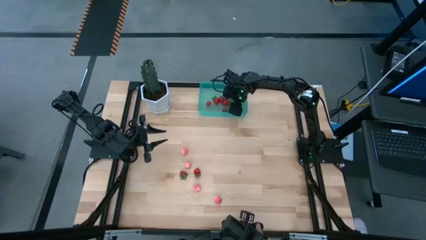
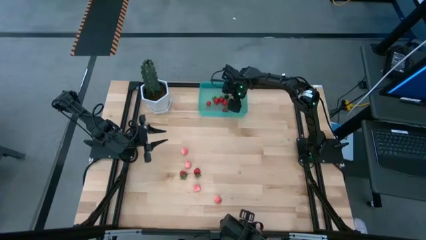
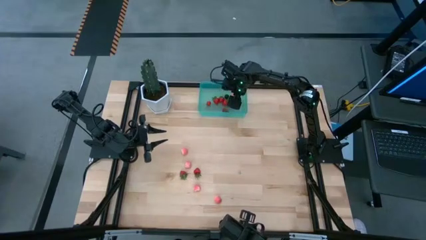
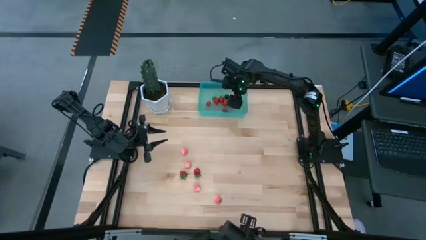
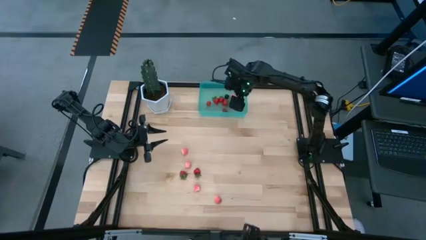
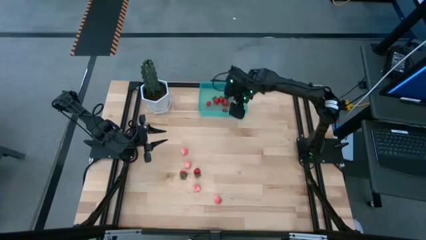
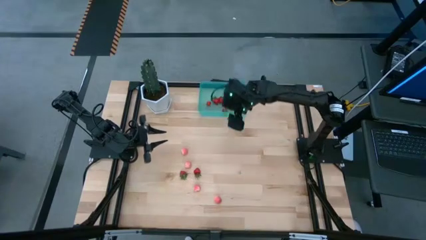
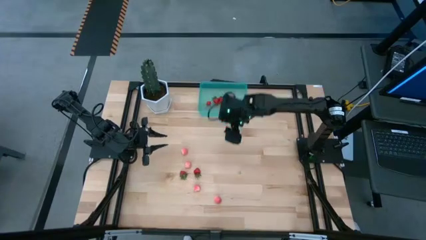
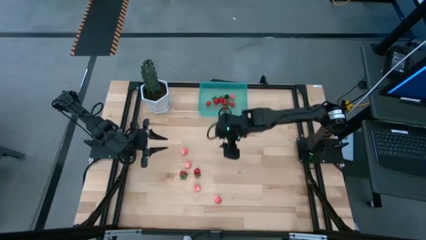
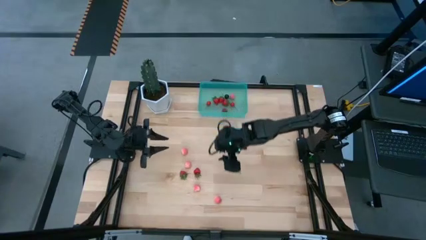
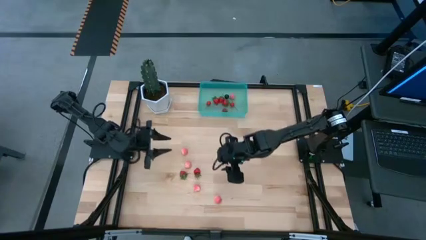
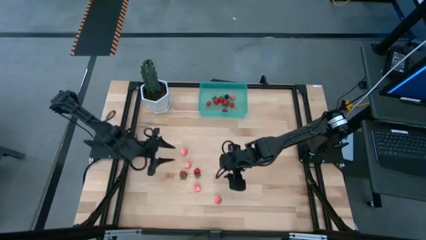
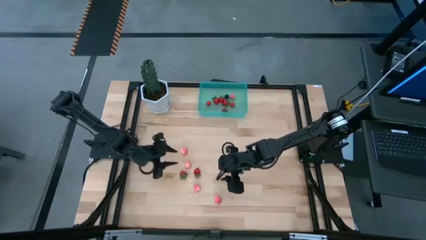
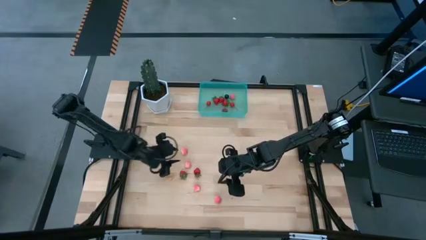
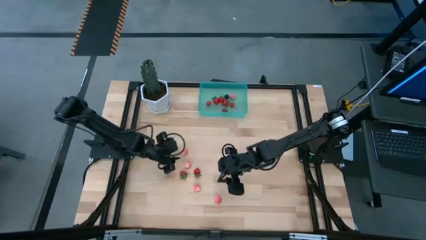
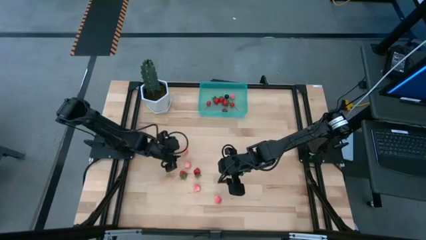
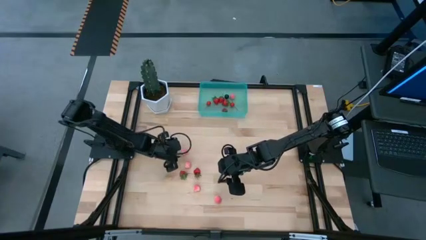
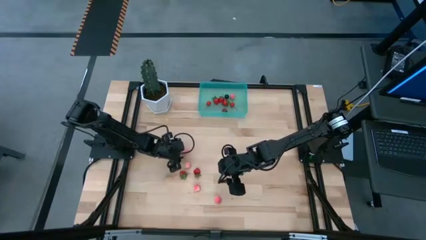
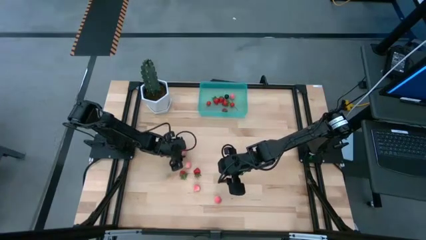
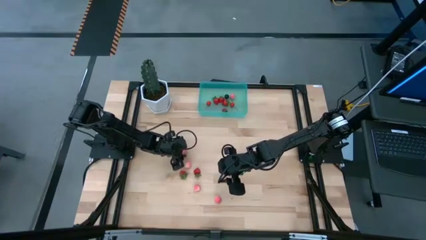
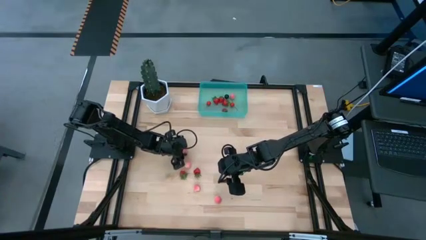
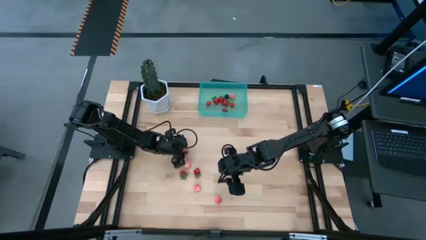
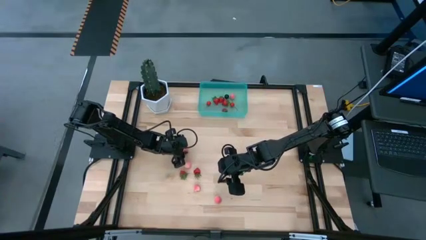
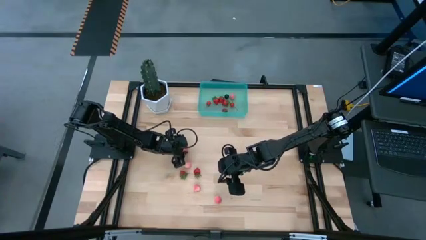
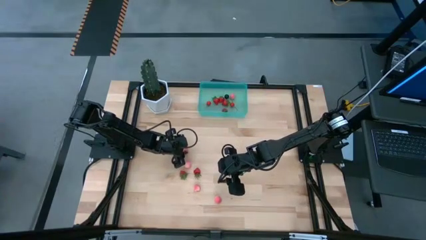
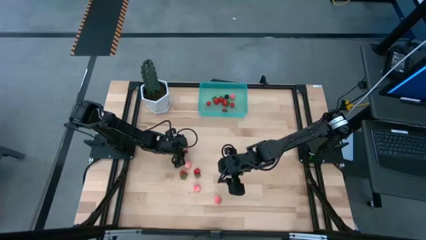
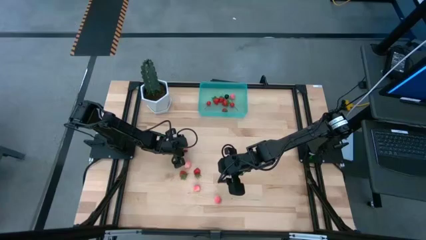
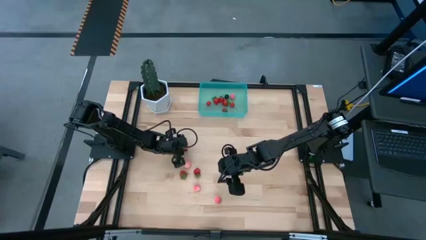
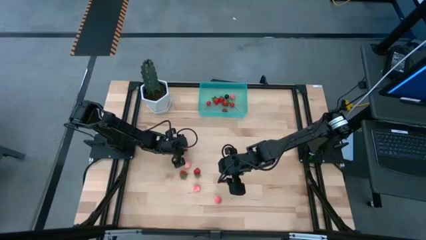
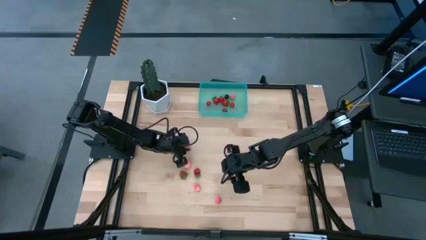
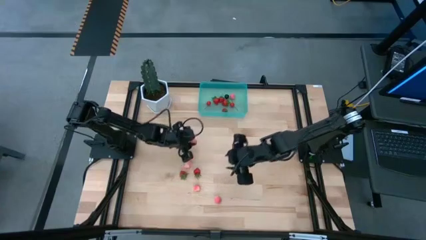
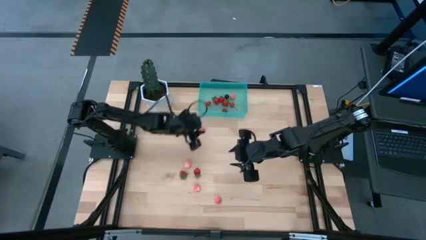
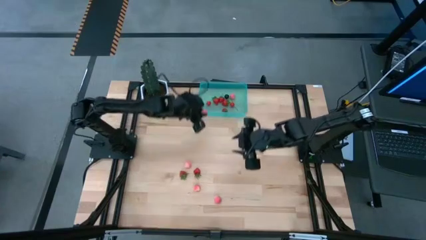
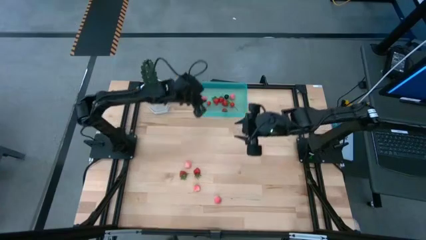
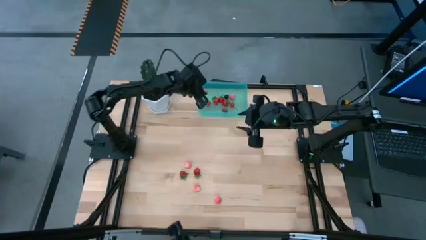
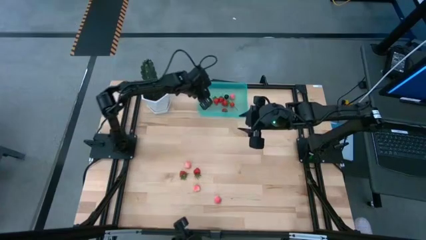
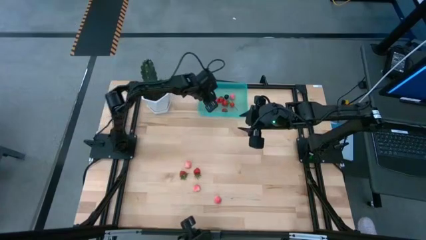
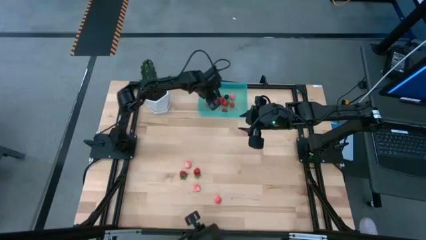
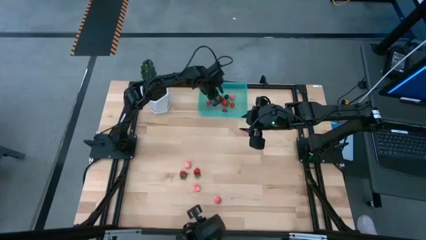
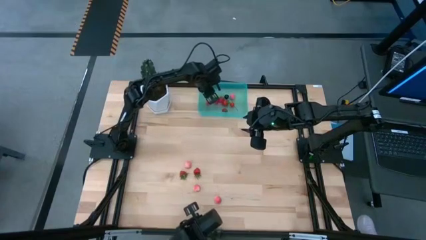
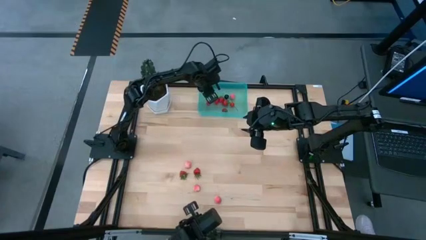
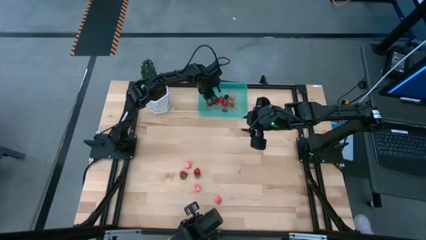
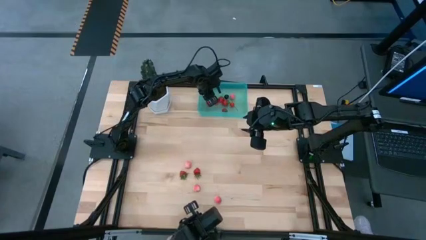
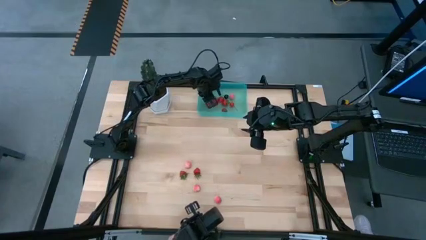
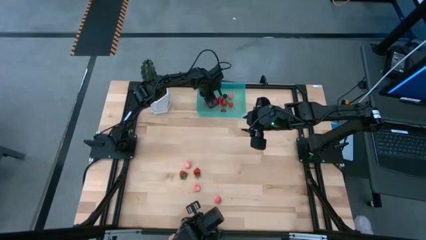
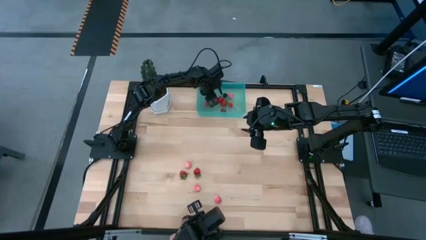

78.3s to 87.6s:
Task: Pick and placing Produce into tupperware
Put the peach into the container

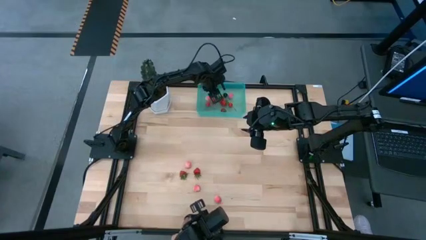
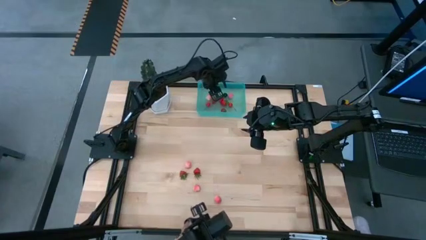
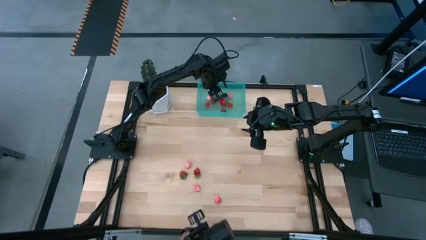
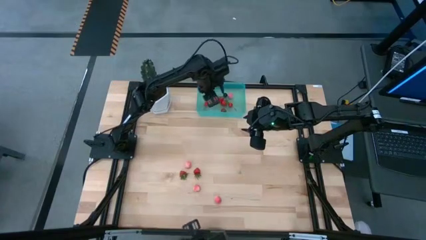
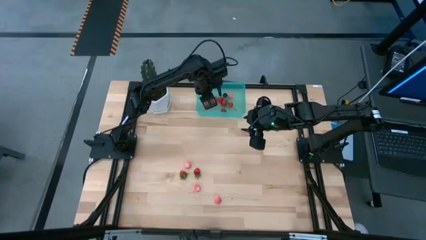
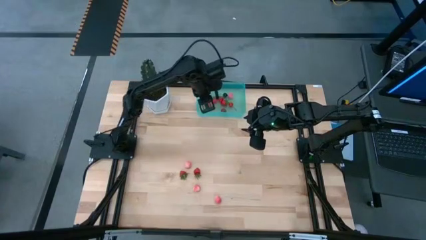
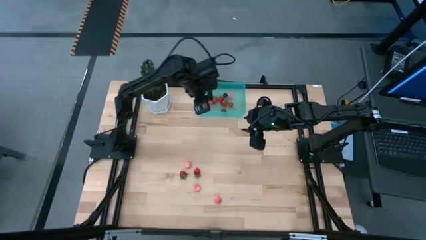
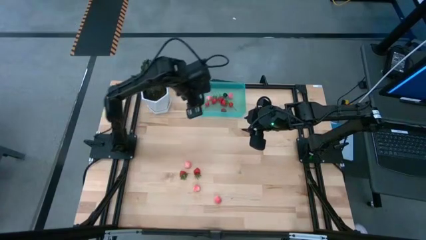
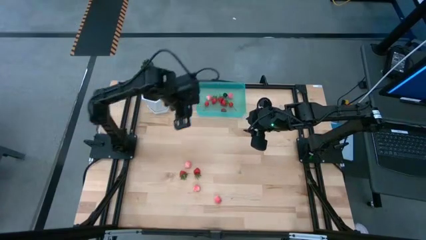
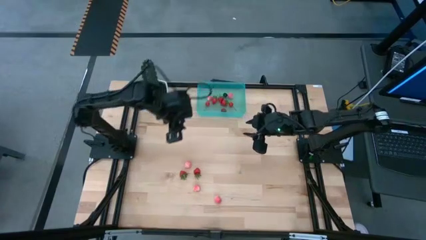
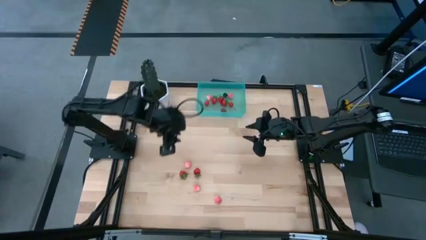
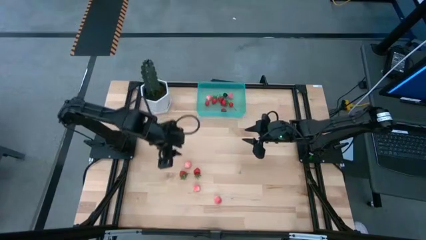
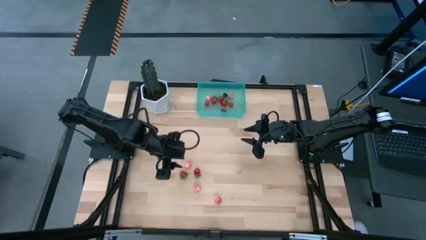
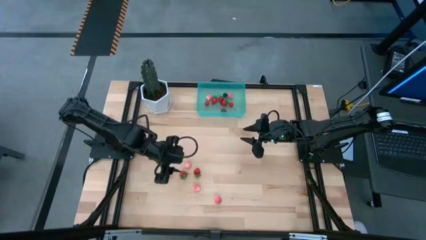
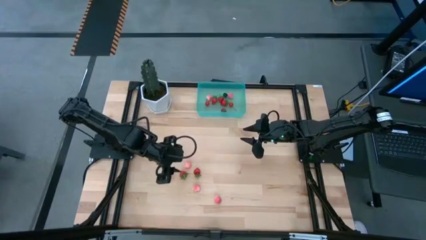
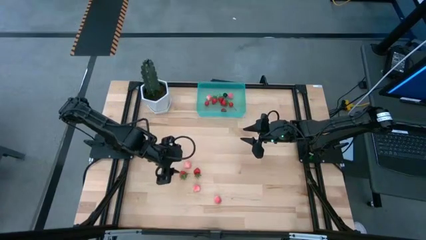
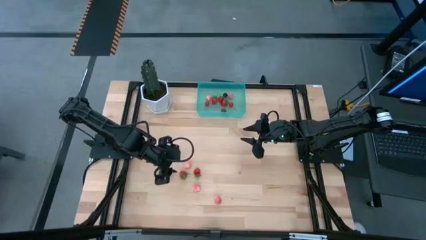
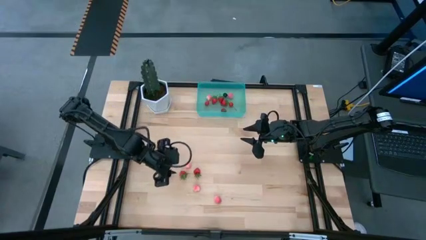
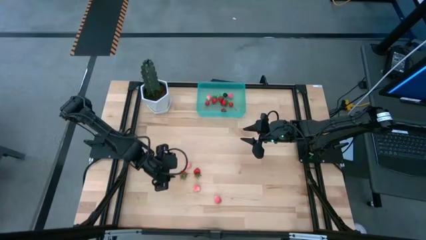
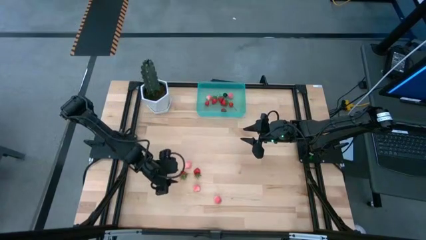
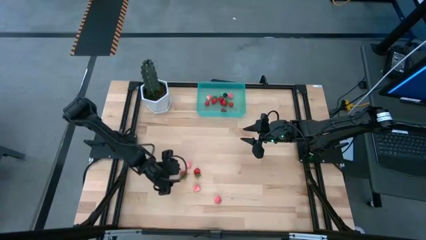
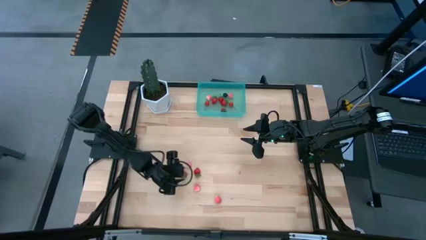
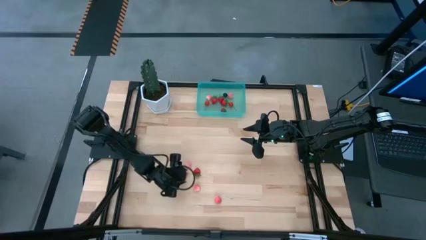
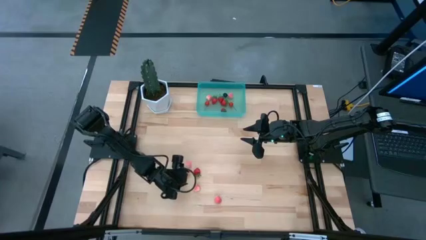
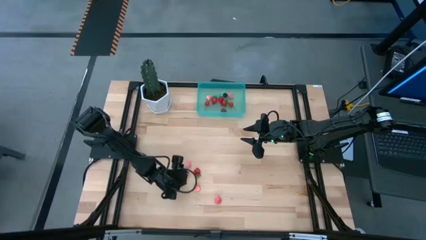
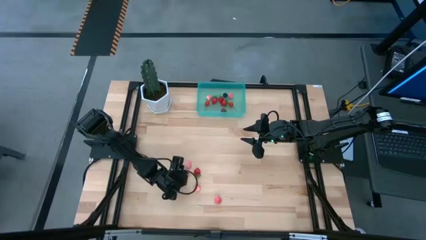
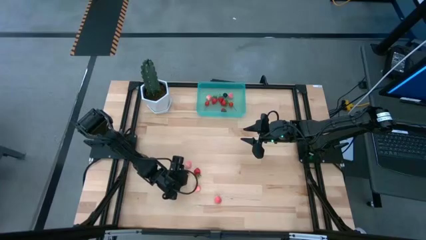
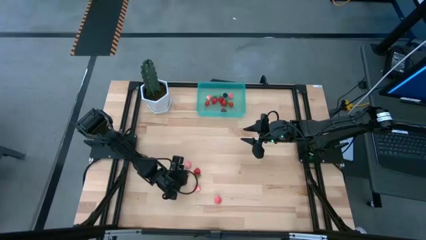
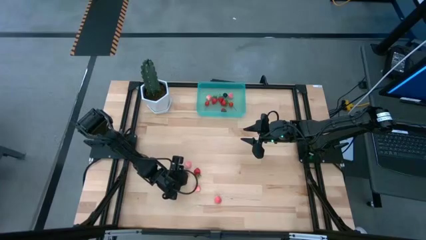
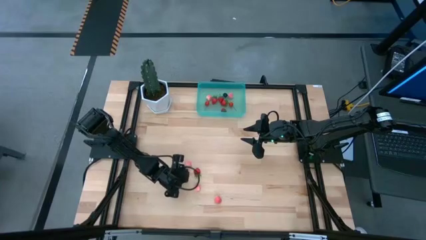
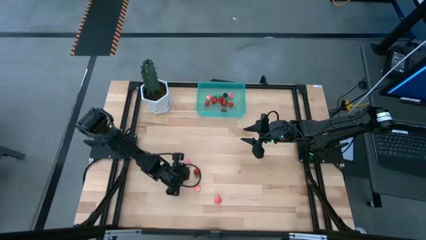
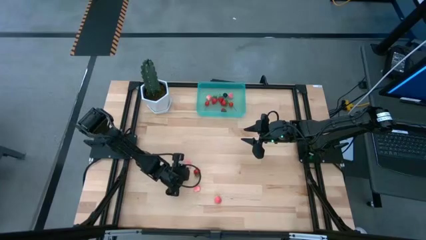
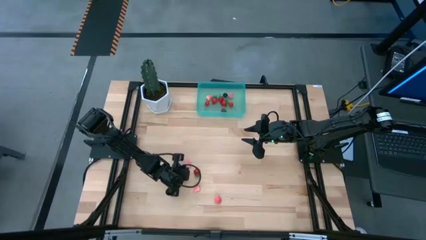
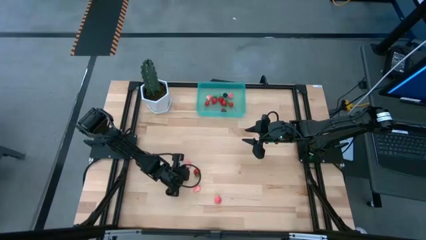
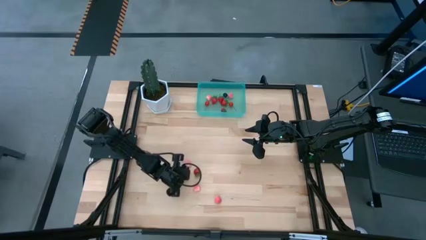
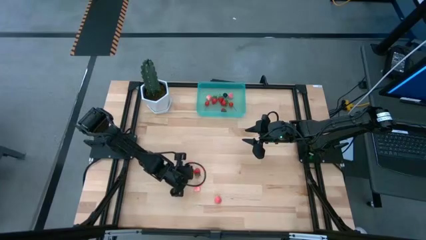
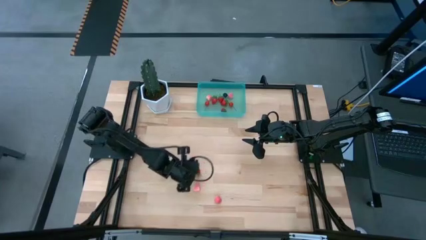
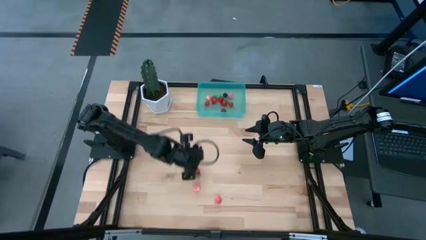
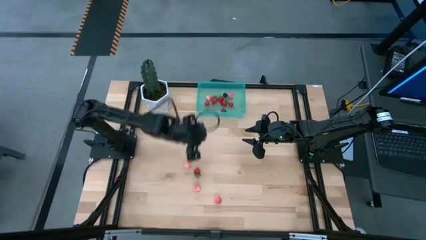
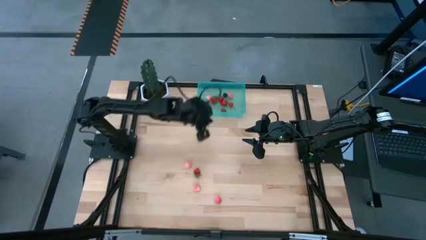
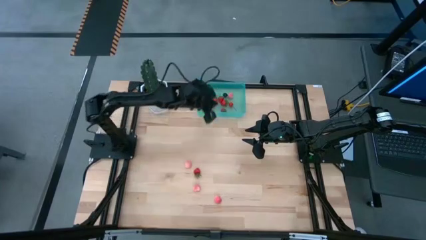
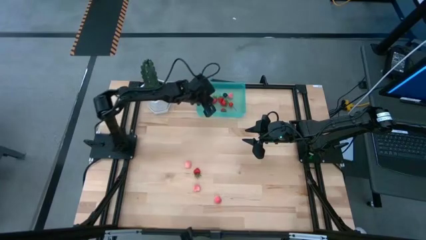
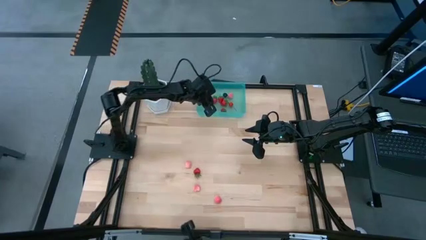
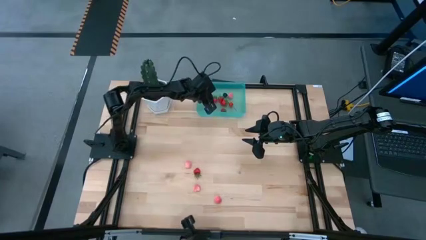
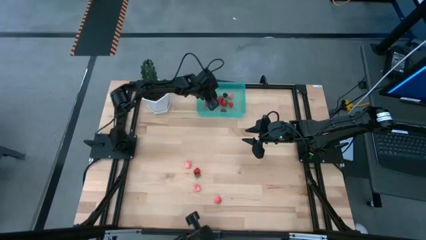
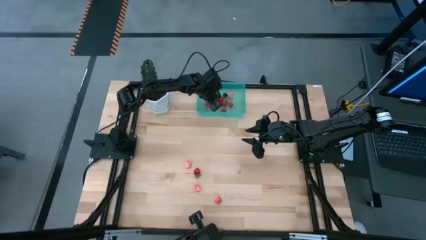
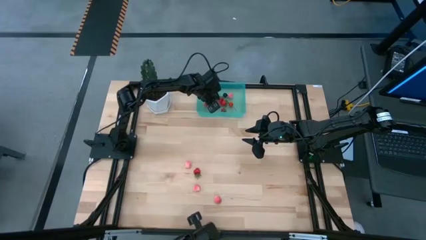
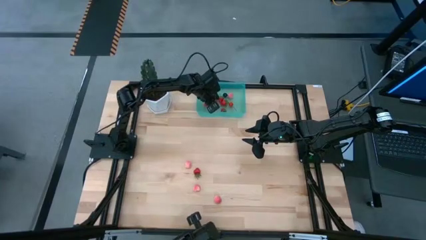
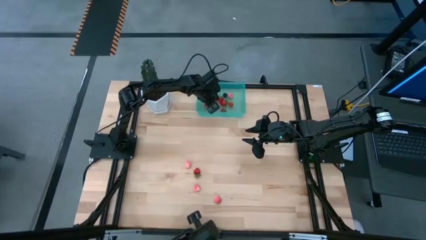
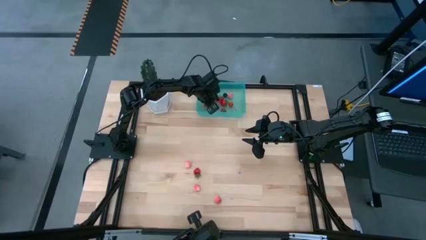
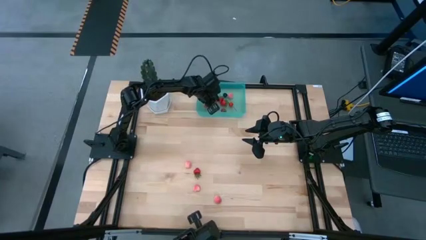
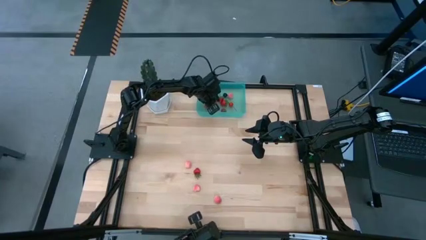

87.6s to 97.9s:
Put the strawberry into the container
